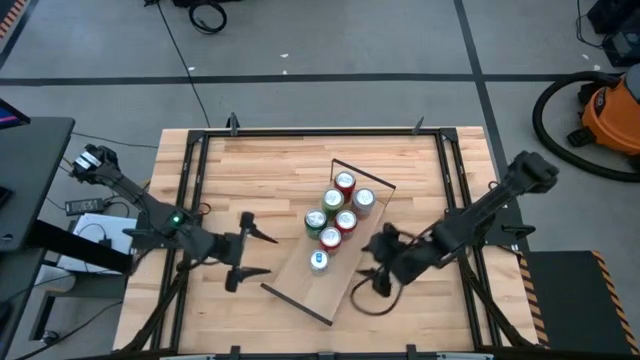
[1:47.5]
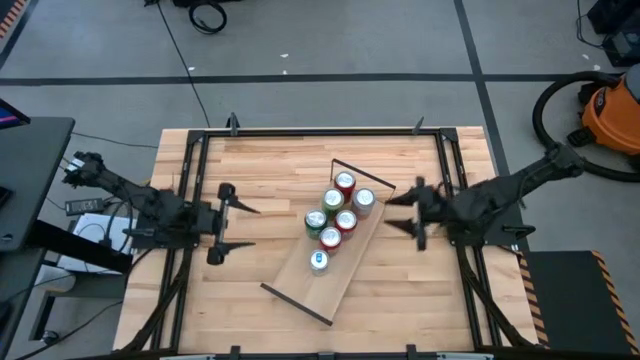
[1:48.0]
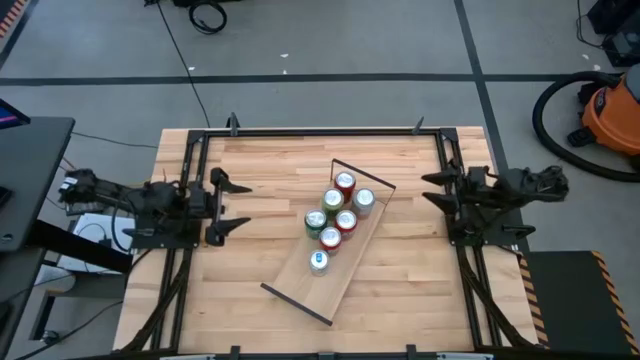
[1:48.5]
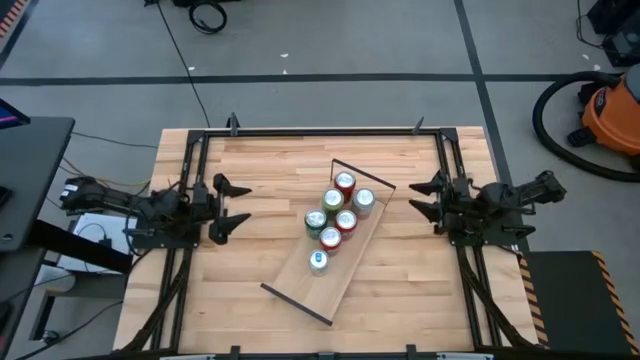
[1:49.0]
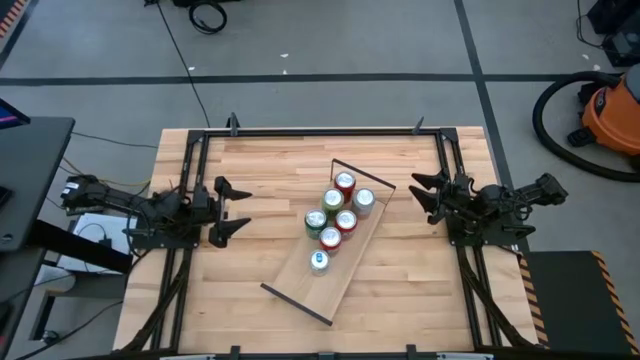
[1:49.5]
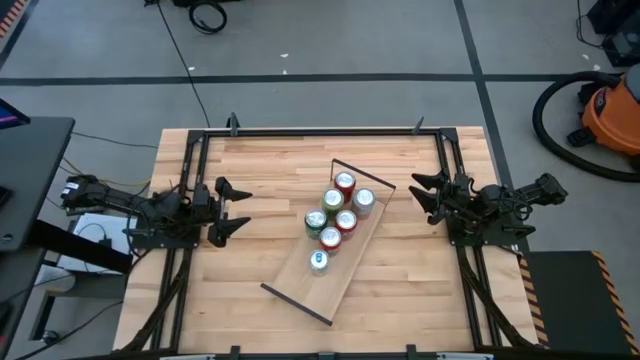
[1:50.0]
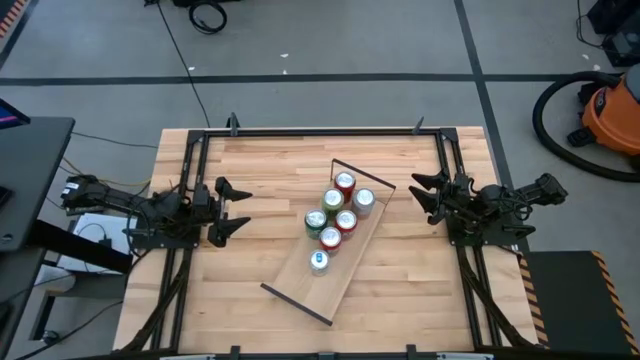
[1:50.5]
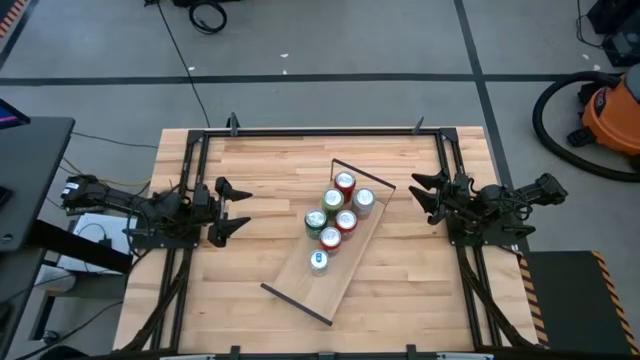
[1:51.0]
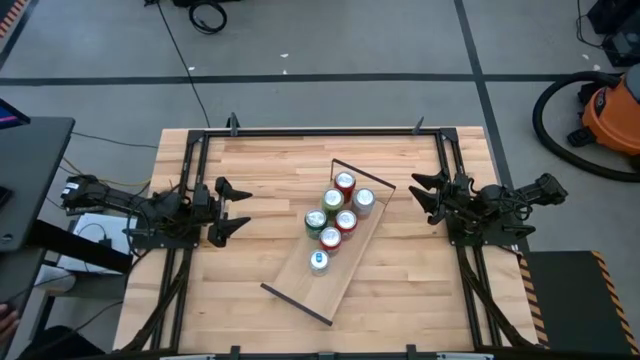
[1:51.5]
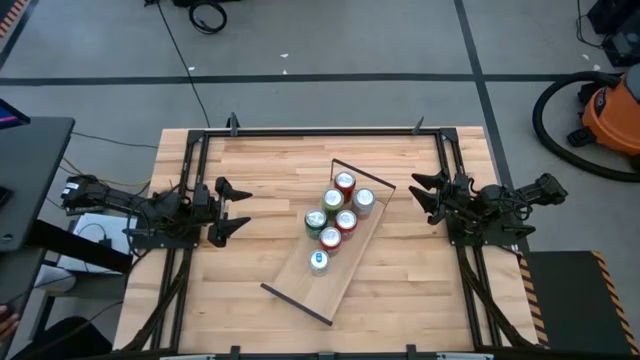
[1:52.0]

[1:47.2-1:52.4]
Task: Place canned beverage on shelf
Return to Home Position

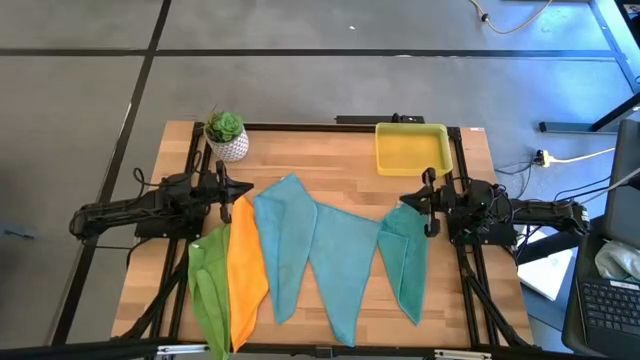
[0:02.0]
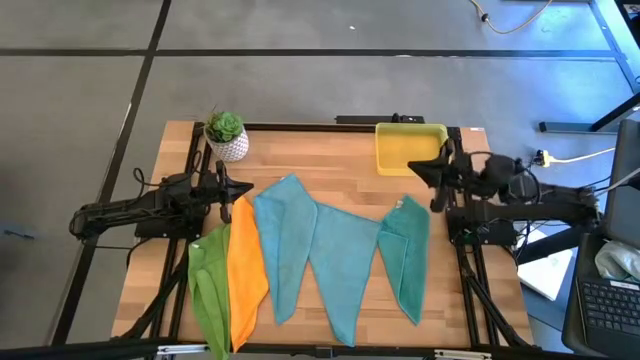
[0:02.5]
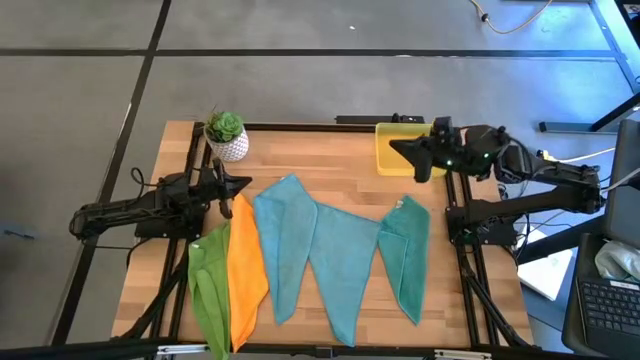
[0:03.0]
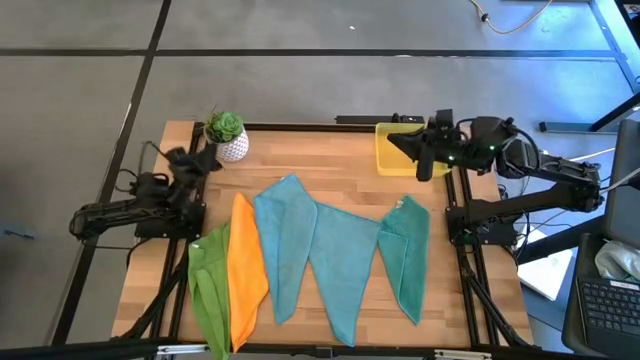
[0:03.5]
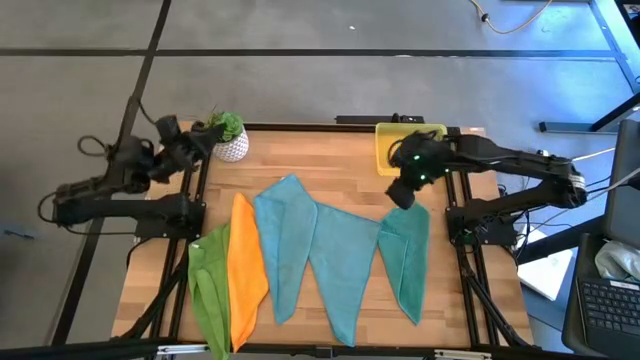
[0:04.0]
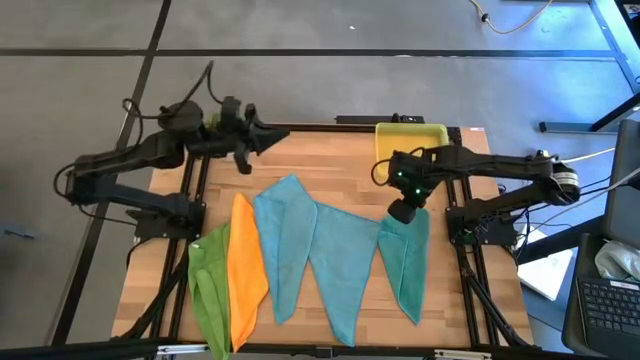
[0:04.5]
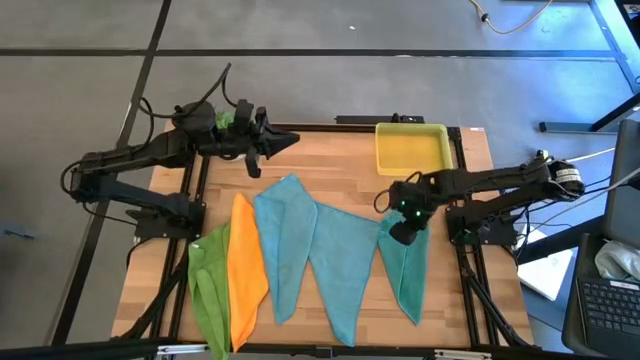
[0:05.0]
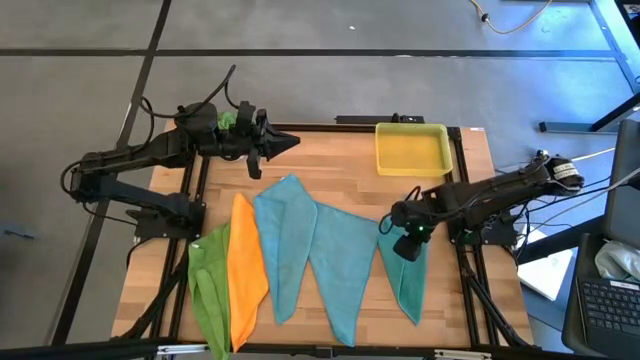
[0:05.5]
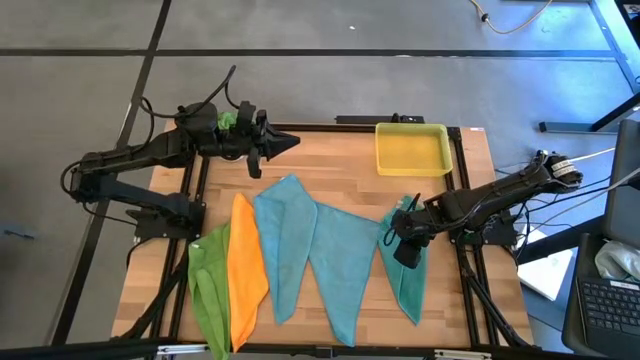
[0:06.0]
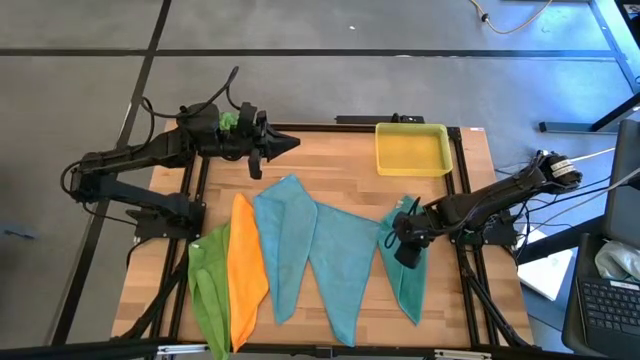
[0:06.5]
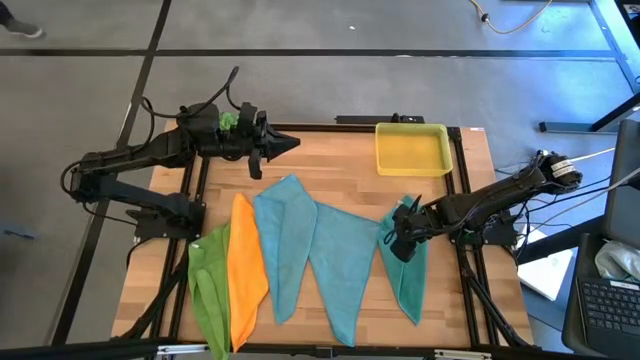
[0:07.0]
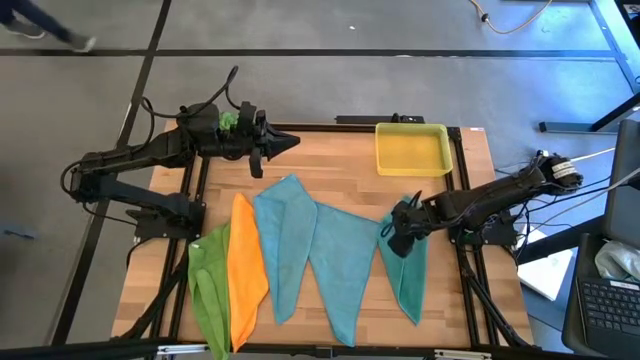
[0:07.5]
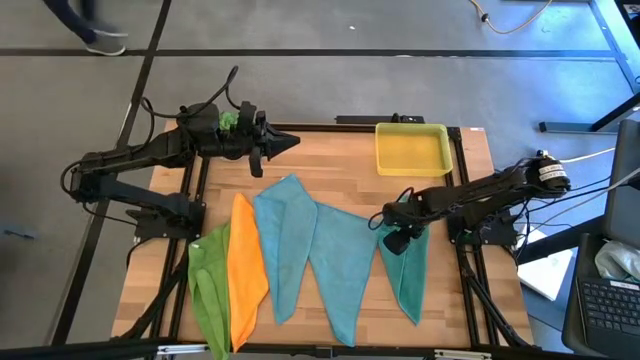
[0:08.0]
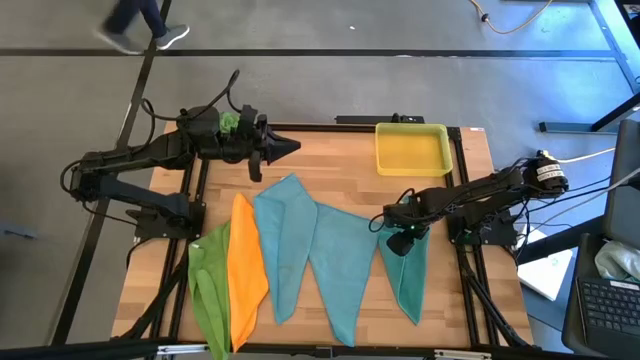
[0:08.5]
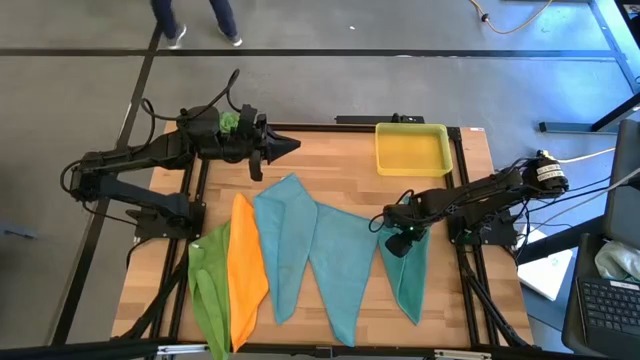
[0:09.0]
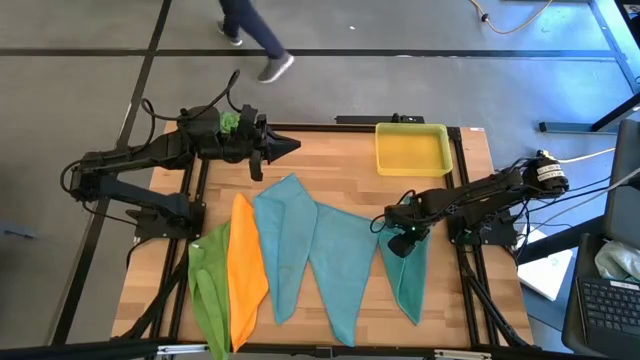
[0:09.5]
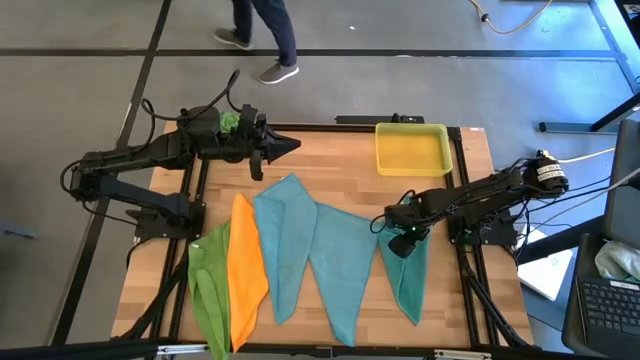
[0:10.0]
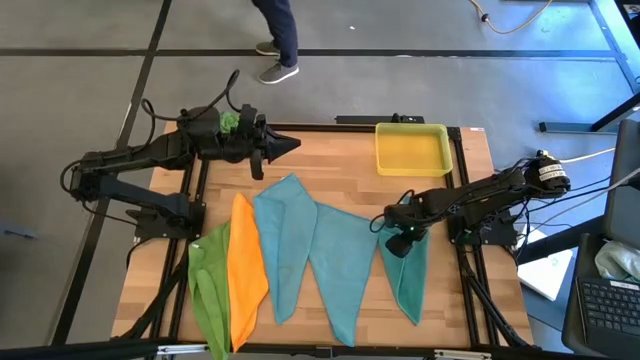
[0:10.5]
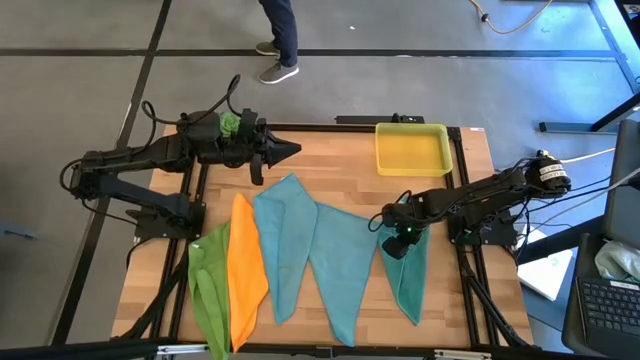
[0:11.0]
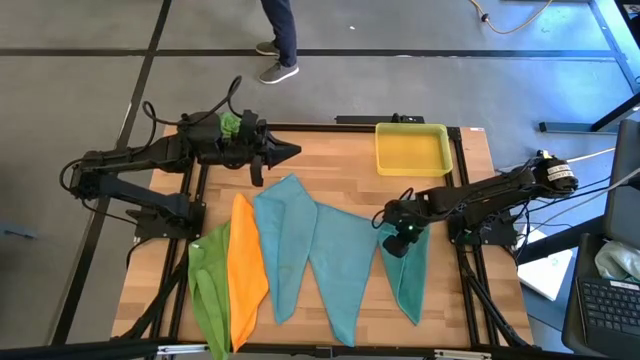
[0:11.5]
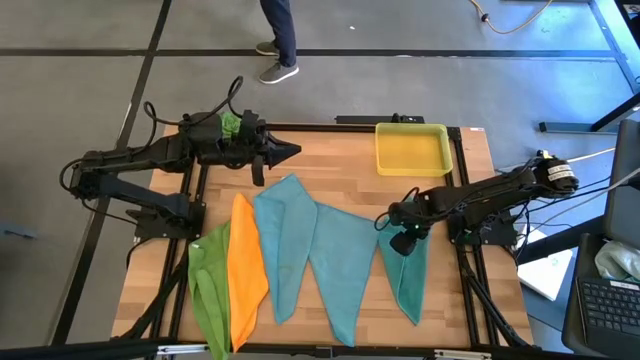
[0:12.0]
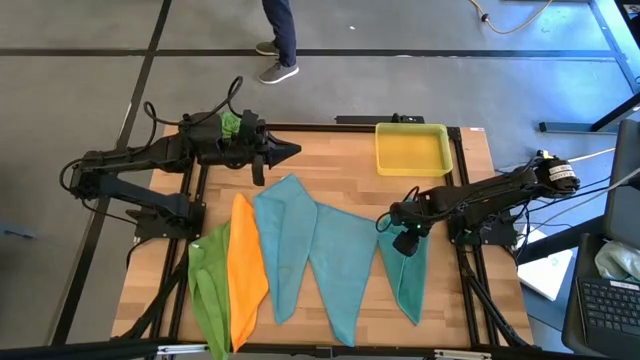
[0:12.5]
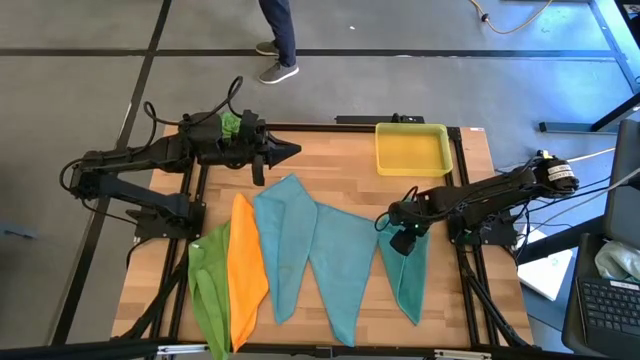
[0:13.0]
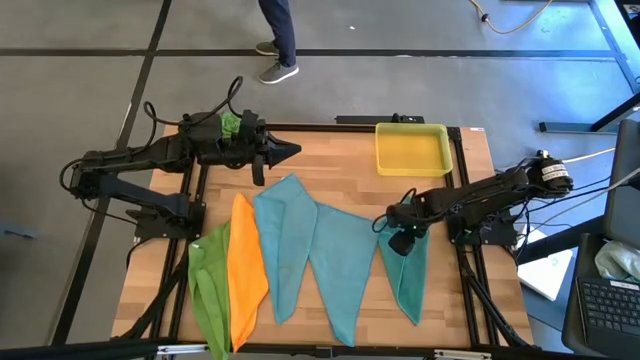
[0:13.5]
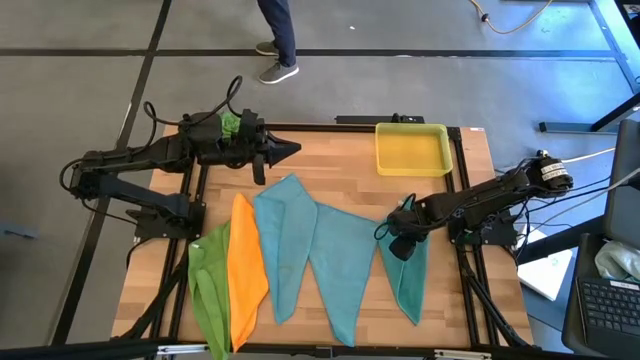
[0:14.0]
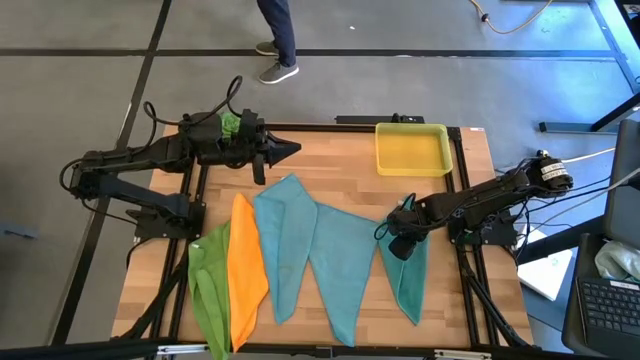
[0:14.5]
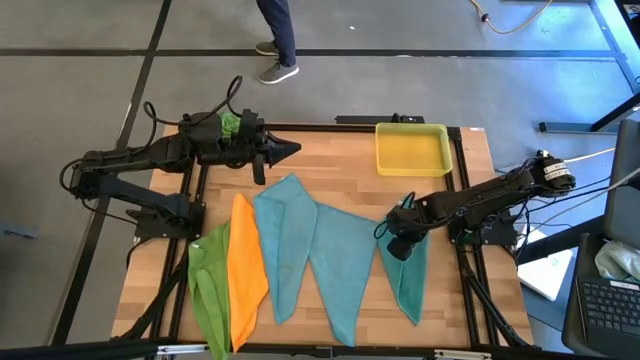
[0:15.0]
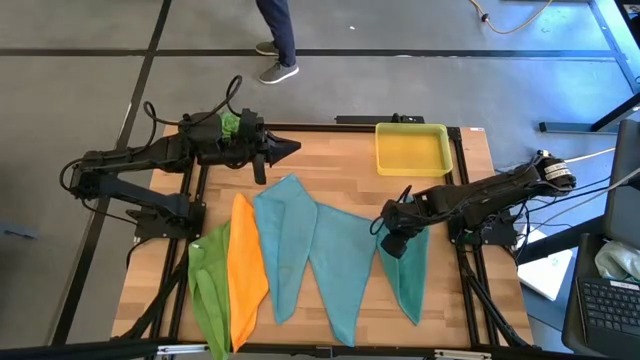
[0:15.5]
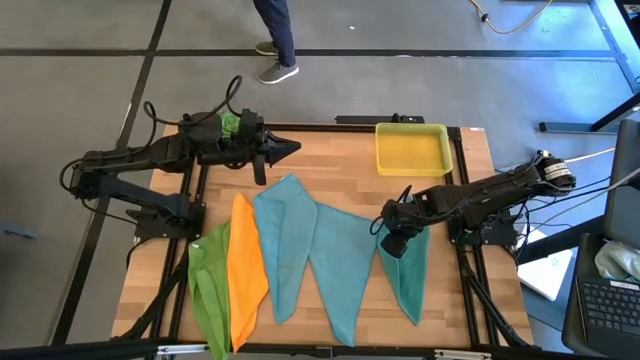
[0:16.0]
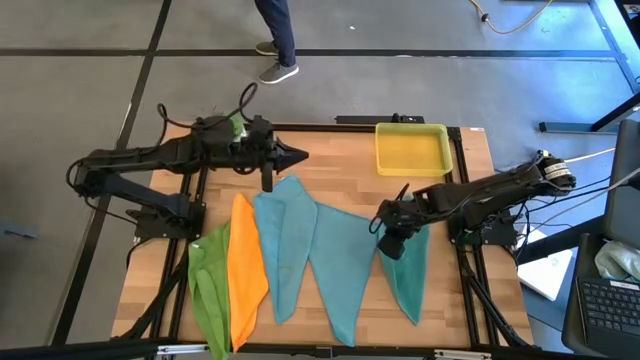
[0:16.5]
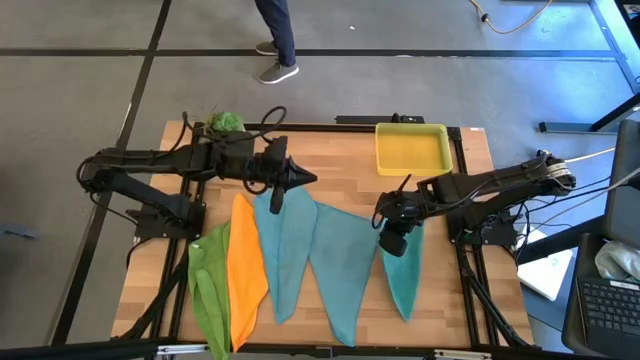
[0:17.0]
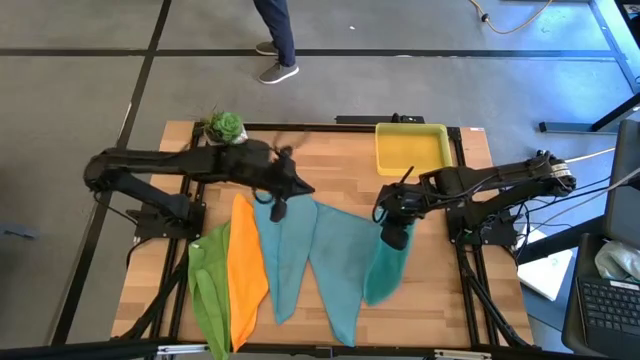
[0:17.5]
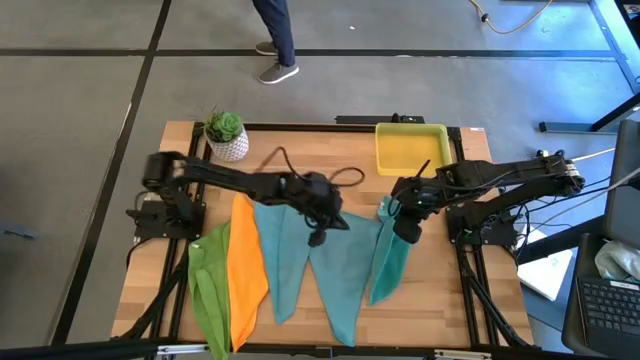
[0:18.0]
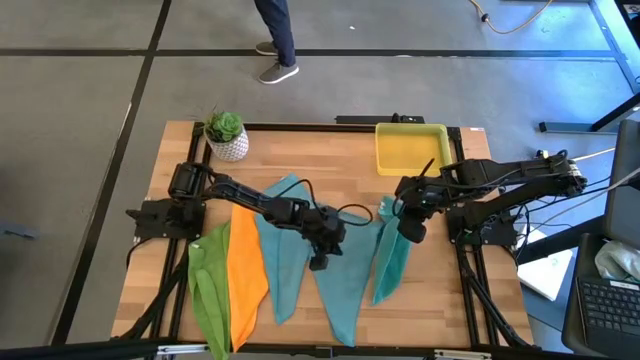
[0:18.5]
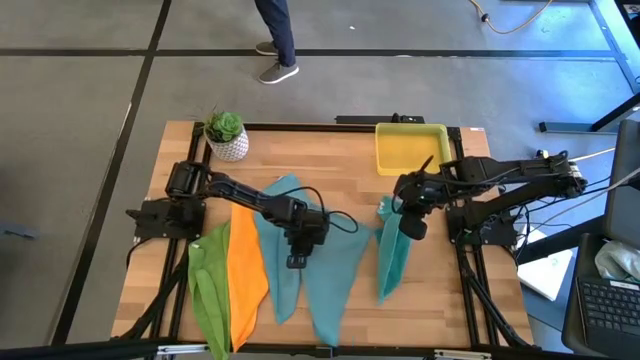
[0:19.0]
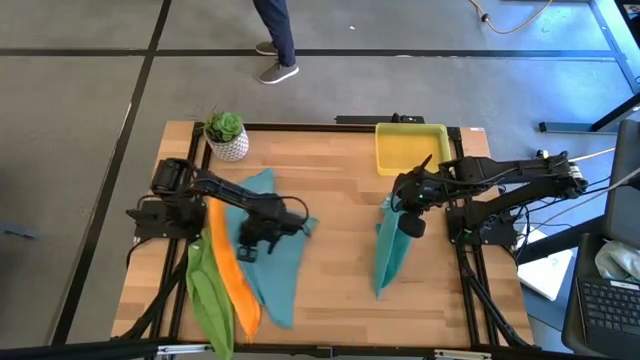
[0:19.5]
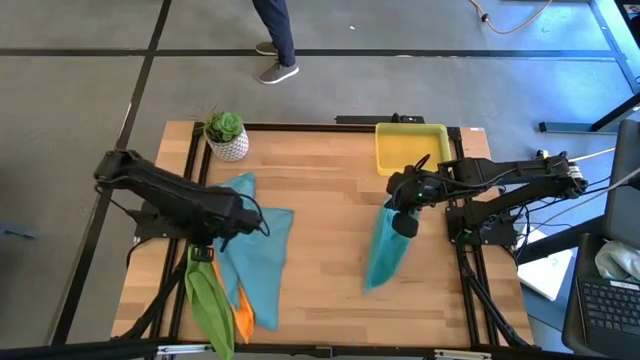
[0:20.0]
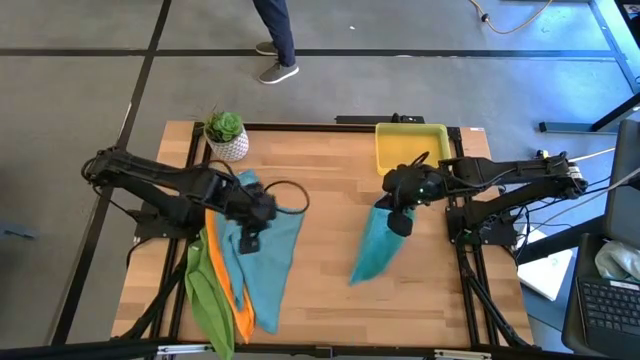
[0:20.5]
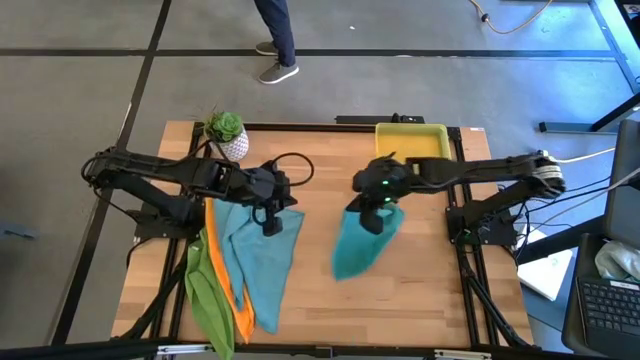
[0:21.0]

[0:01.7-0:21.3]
Task: Fold microfiber towels
Fold the right blue microfiber towel
